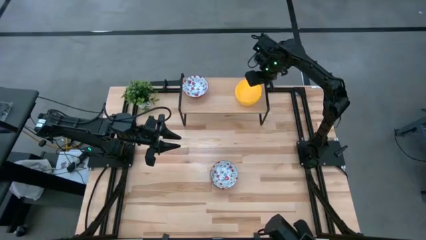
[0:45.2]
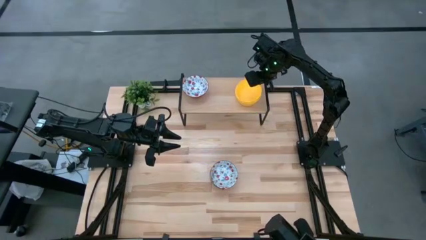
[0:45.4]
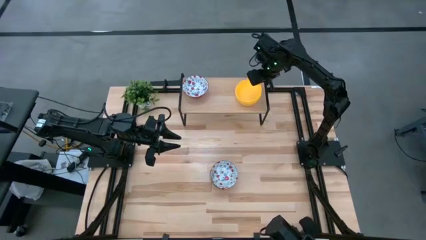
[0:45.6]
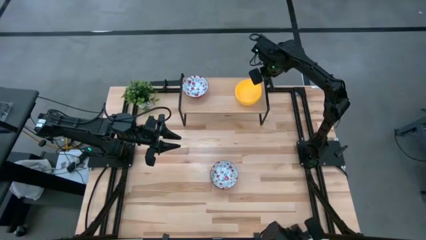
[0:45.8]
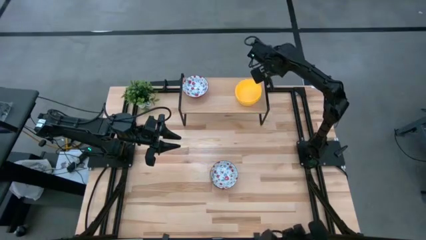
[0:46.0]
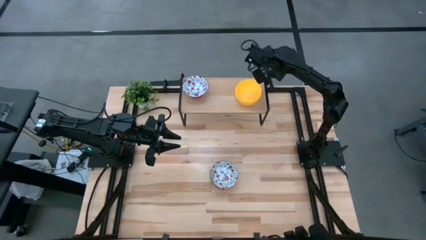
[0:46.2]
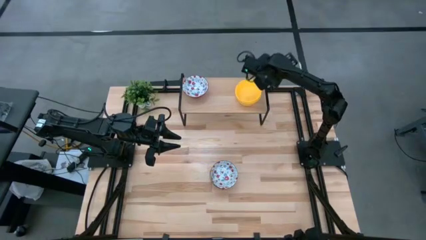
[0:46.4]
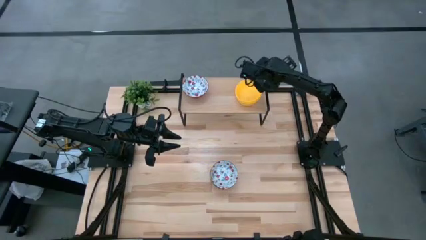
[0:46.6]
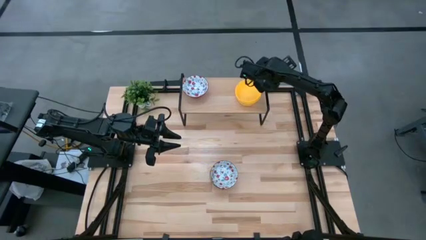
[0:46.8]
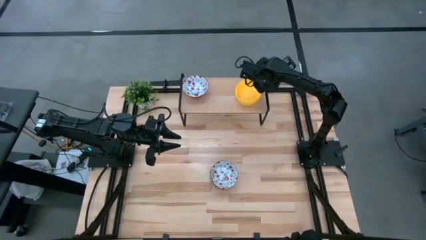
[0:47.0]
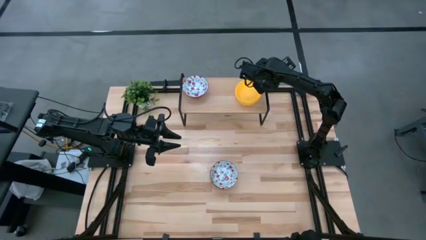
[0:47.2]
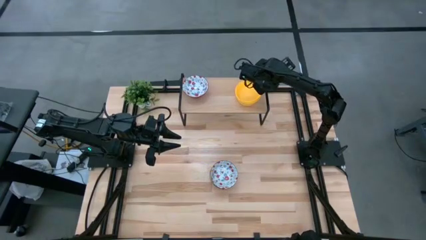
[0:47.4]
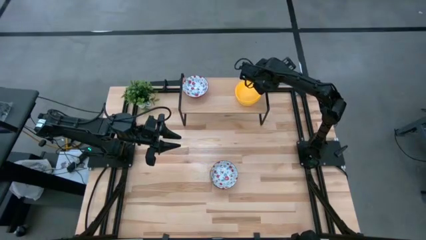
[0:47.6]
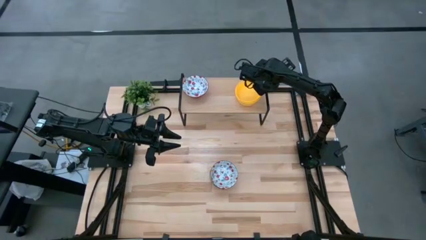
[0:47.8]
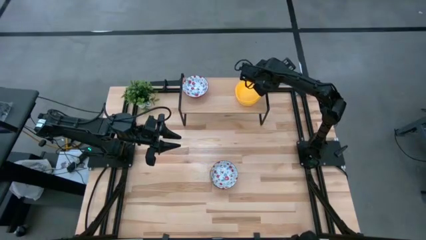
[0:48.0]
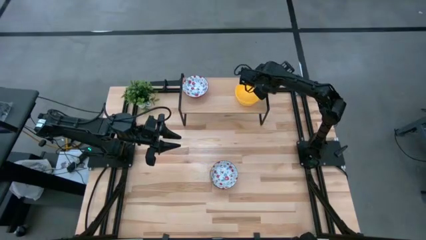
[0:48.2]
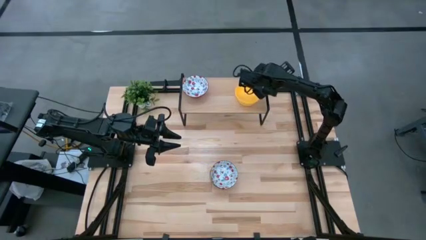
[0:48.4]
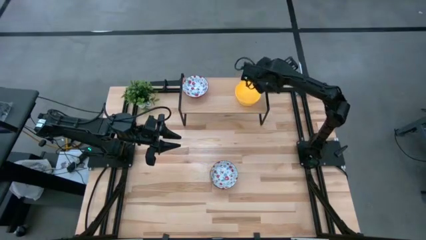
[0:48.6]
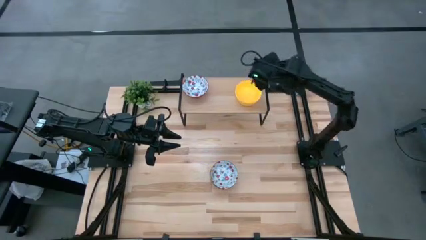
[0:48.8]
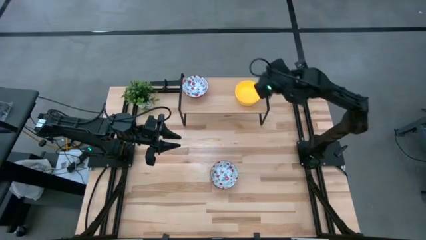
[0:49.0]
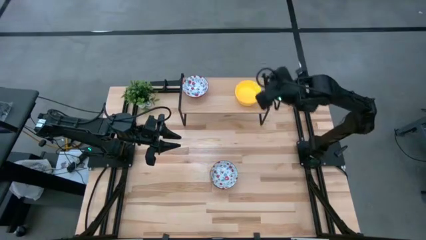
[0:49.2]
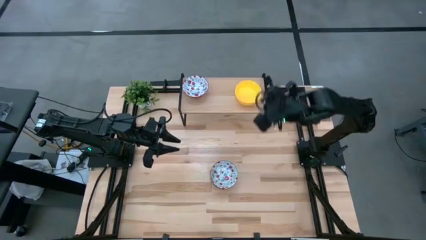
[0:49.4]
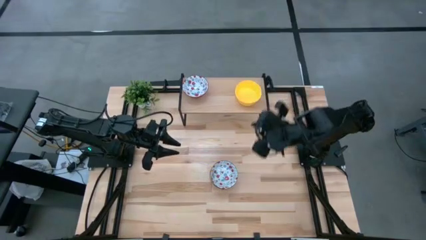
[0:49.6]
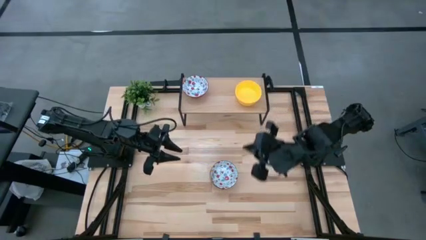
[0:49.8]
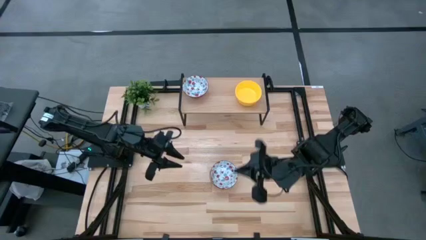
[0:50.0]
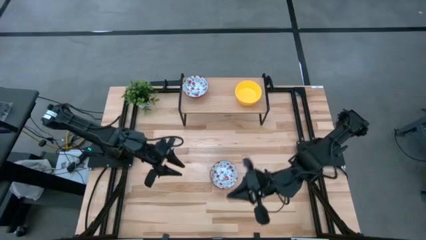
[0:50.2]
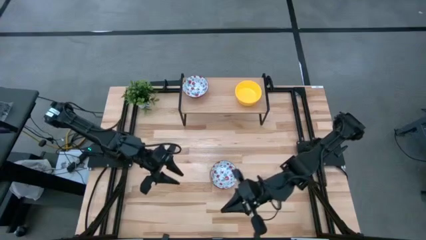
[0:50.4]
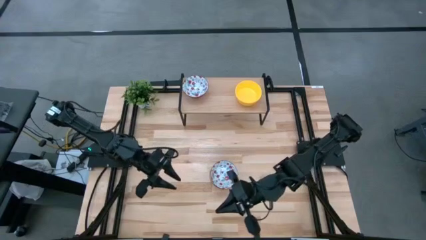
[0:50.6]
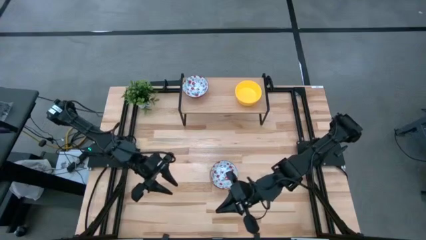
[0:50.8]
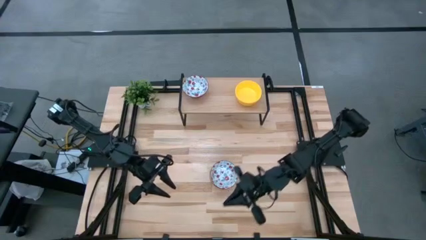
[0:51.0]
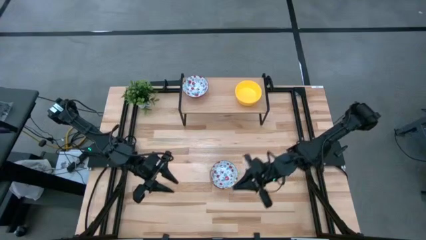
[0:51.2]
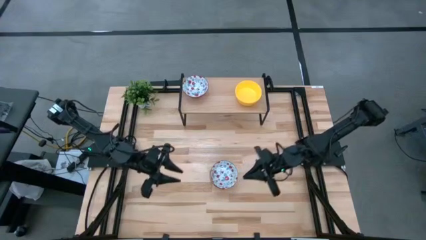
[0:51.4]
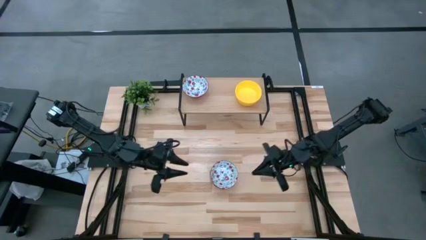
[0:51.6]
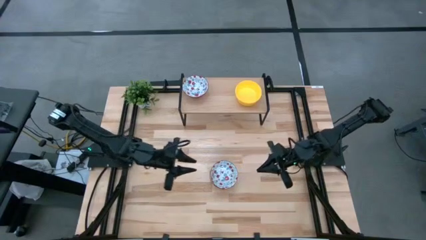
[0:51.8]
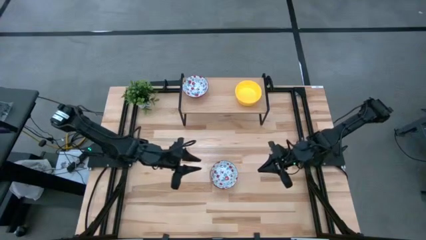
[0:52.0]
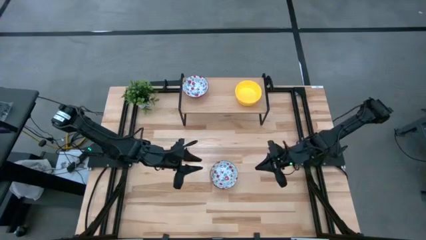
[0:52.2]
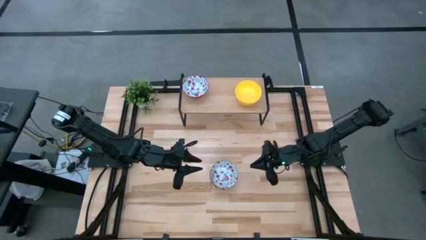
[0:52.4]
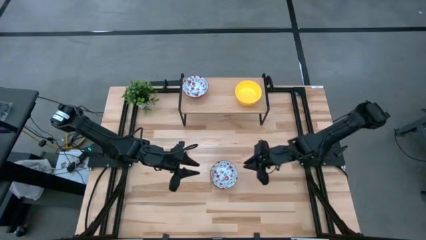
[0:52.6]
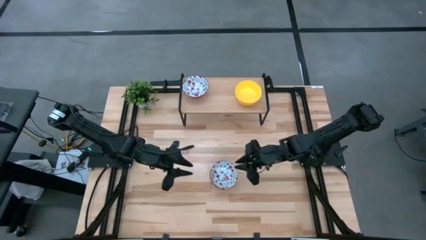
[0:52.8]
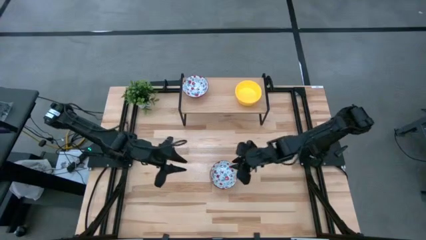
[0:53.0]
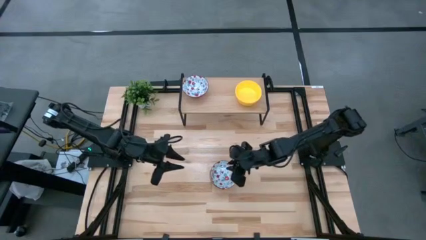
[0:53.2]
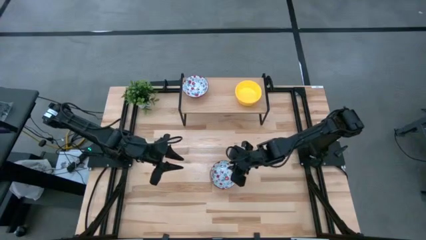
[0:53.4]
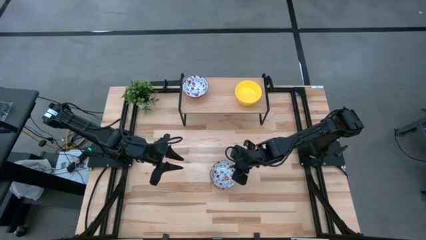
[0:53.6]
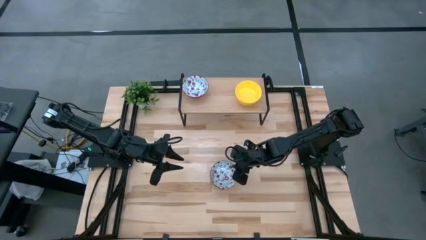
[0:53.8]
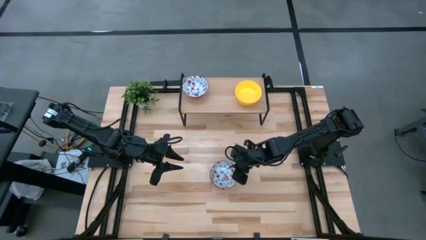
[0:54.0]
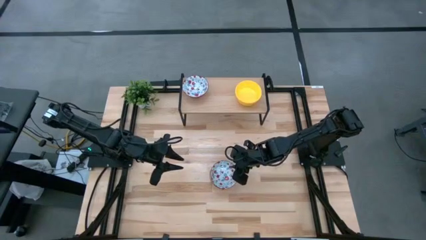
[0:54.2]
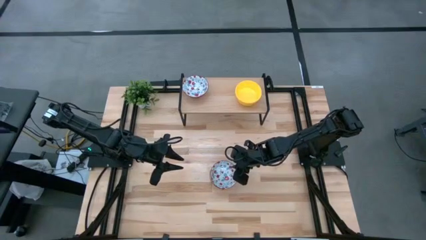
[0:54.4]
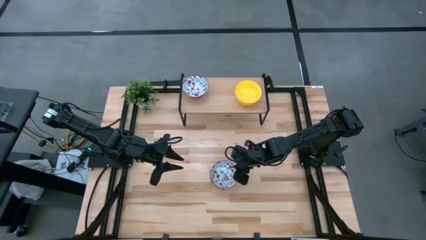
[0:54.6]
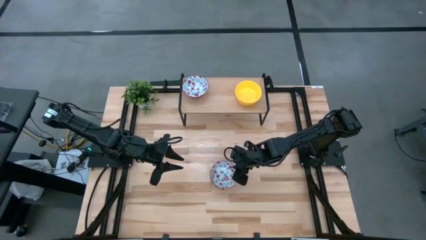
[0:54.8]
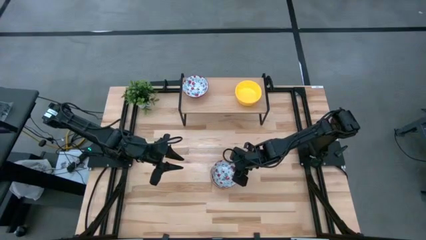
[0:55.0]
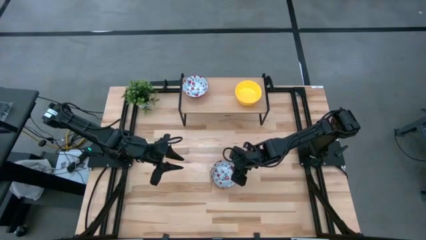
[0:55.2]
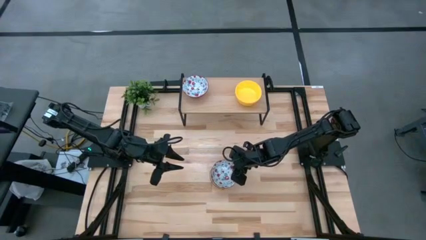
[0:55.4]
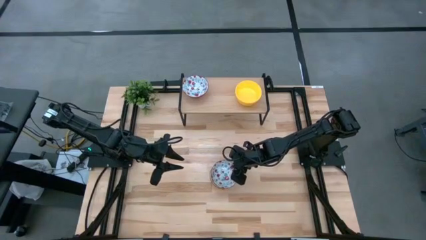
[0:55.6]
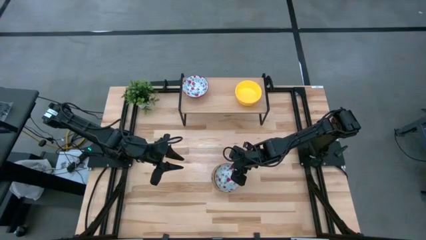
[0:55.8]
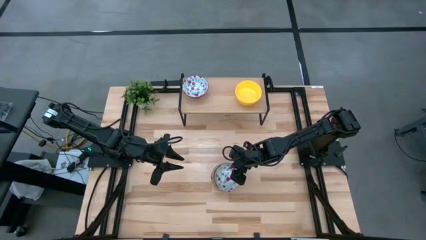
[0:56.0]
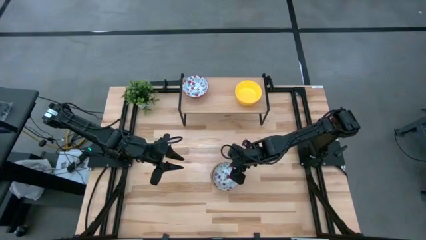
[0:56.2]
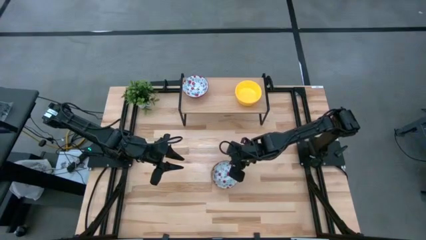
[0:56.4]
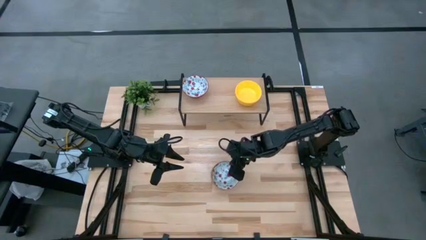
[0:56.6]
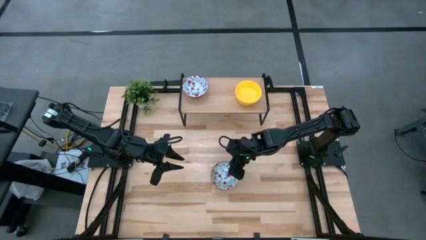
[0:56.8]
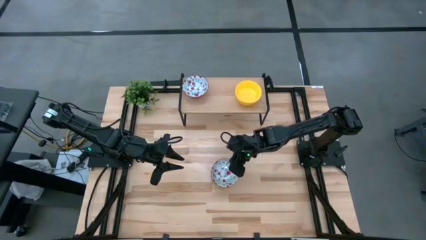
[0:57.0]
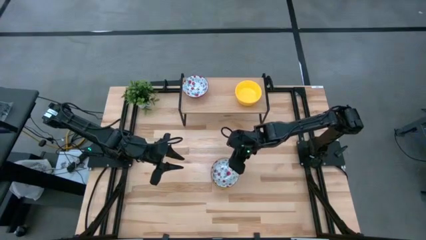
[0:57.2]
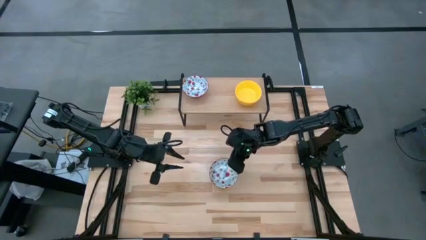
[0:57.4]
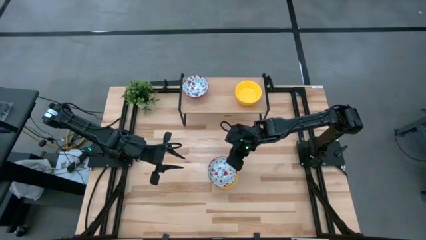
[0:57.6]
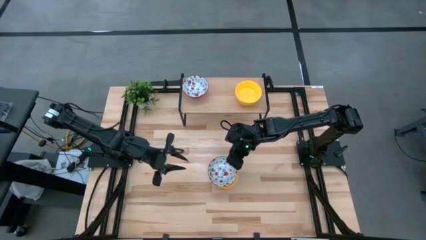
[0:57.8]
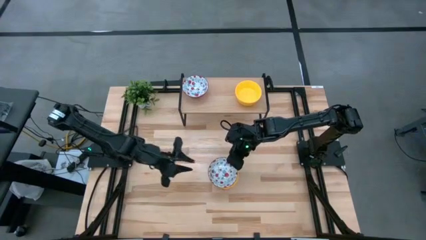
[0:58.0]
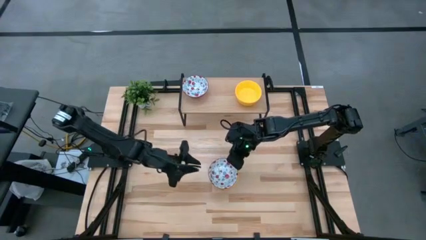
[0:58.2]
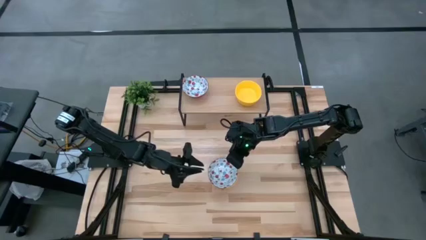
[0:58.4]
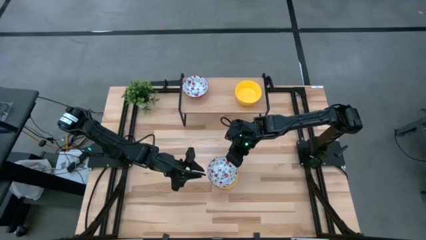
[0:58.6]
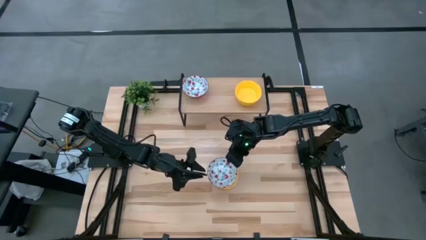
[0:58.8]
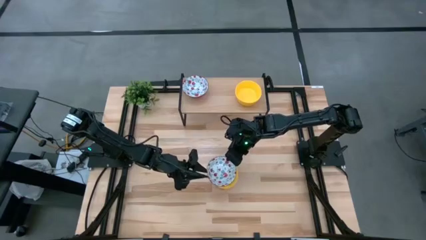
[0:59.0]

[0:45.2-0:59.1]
Task: Pick & Place Mini bowls
Stack the red and blue bowl on top of the other red and blue bowl on the shelf
